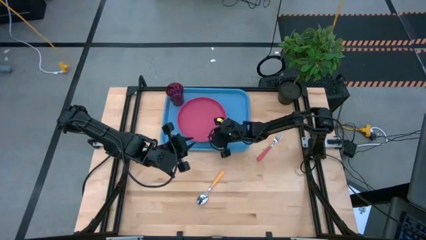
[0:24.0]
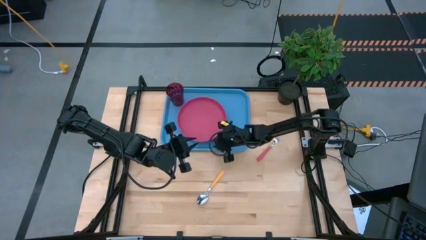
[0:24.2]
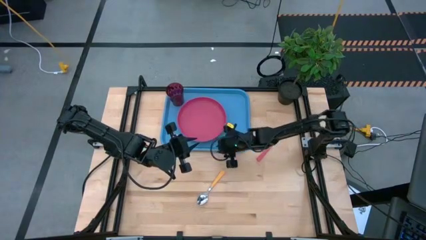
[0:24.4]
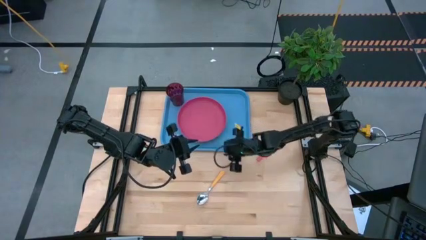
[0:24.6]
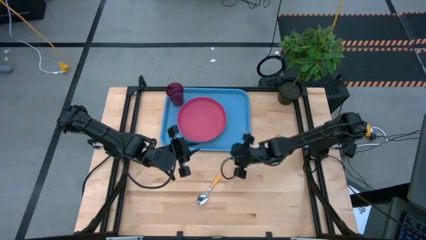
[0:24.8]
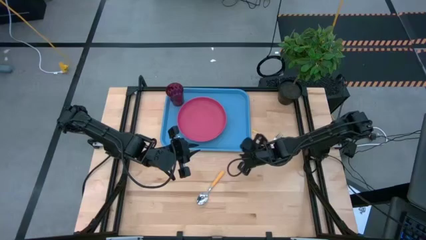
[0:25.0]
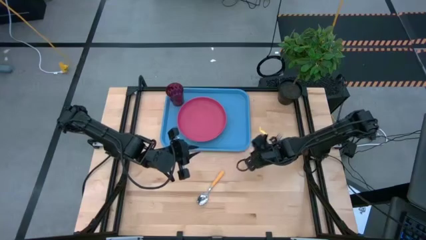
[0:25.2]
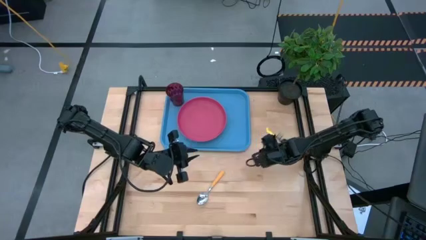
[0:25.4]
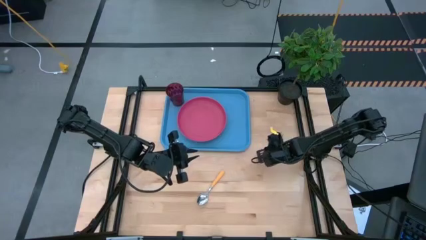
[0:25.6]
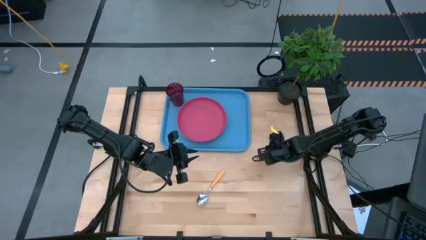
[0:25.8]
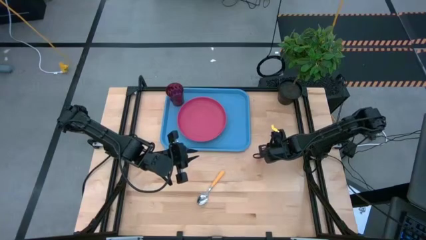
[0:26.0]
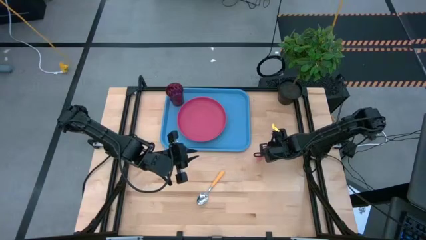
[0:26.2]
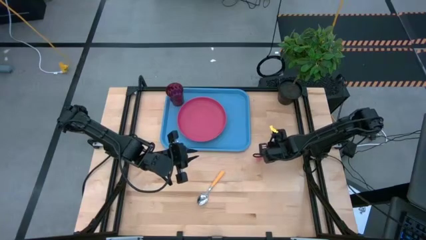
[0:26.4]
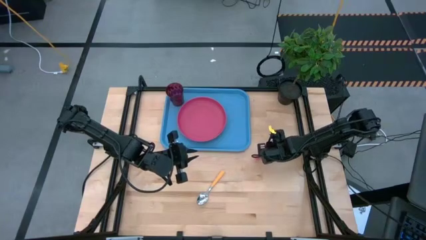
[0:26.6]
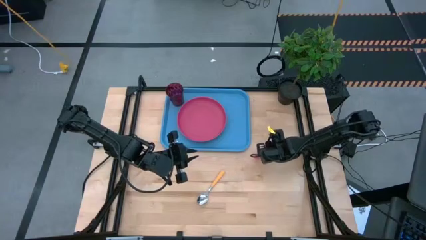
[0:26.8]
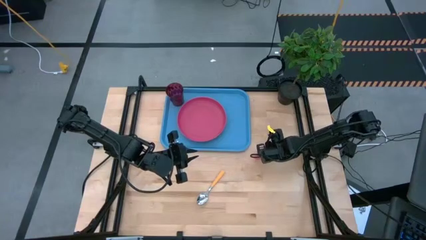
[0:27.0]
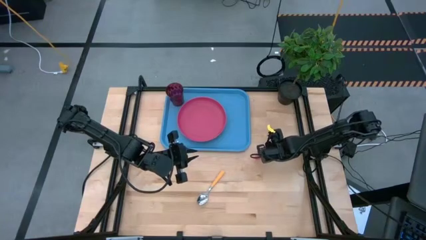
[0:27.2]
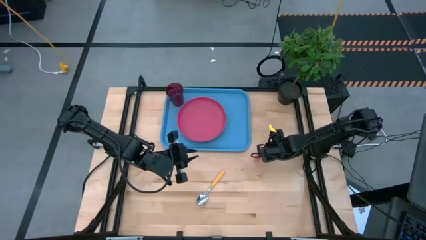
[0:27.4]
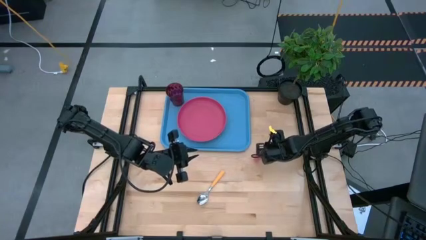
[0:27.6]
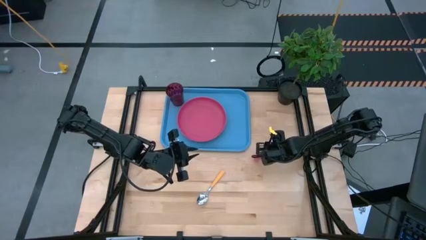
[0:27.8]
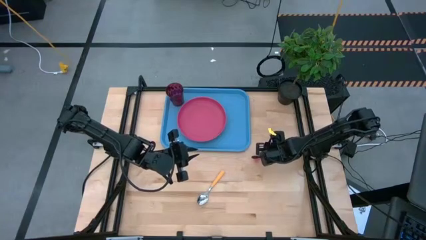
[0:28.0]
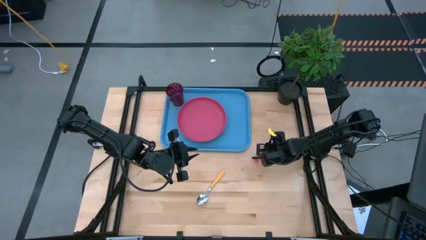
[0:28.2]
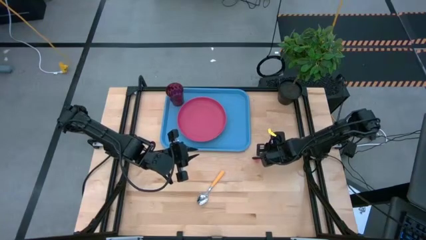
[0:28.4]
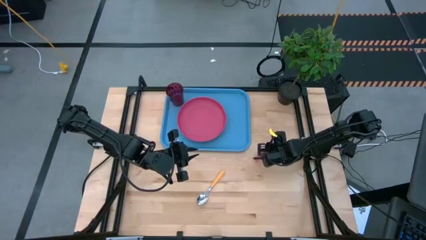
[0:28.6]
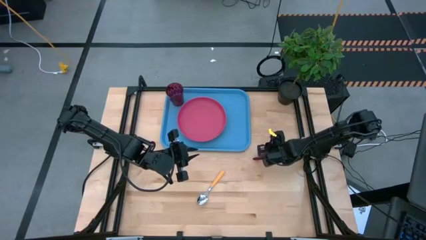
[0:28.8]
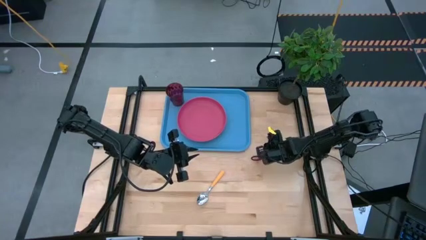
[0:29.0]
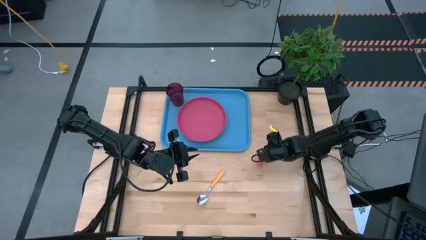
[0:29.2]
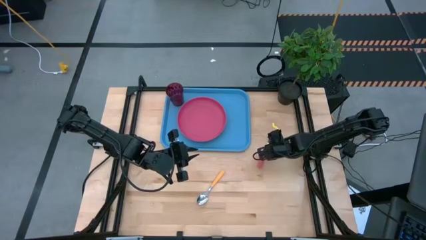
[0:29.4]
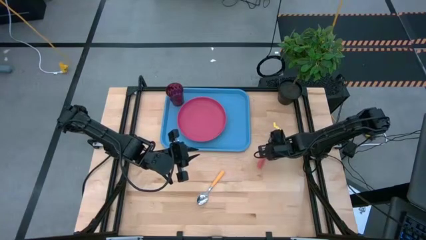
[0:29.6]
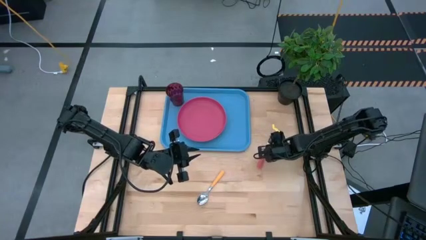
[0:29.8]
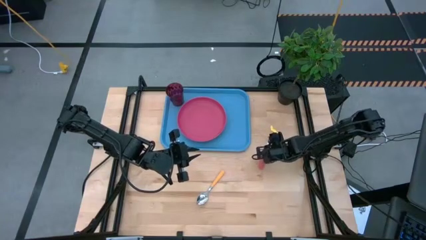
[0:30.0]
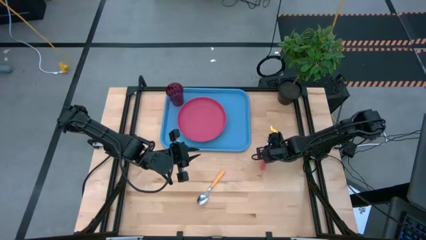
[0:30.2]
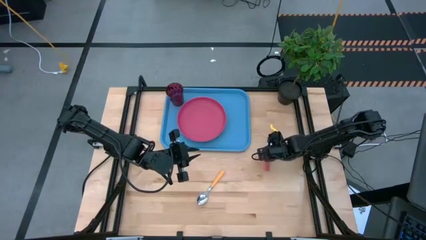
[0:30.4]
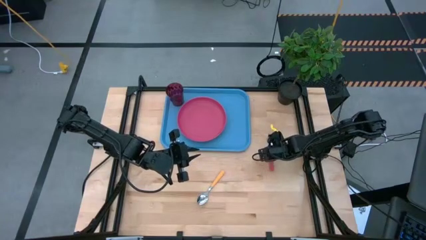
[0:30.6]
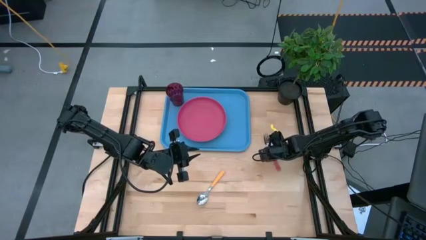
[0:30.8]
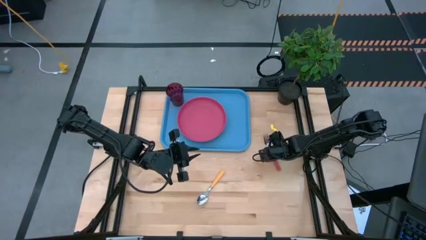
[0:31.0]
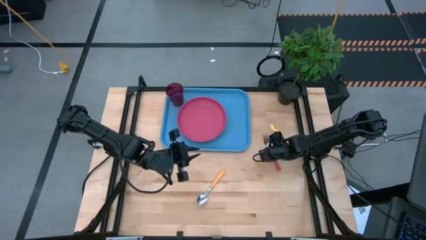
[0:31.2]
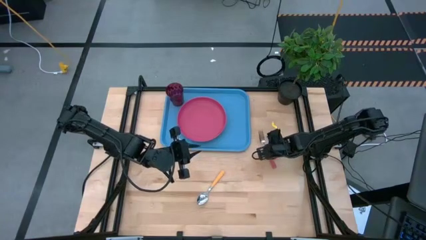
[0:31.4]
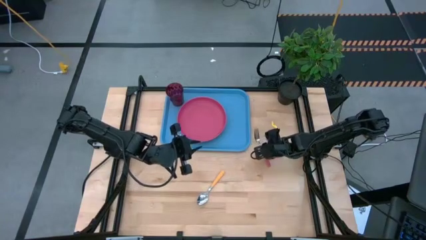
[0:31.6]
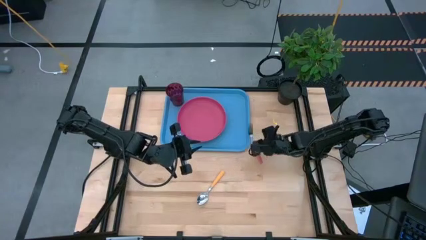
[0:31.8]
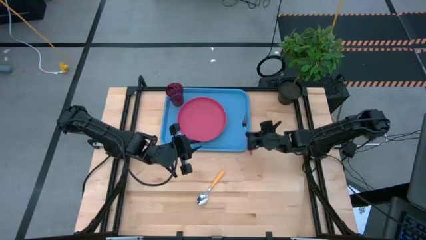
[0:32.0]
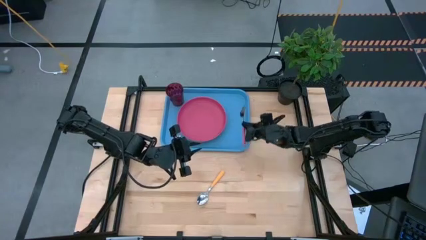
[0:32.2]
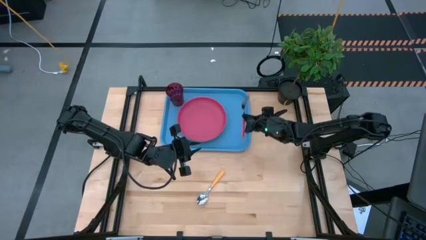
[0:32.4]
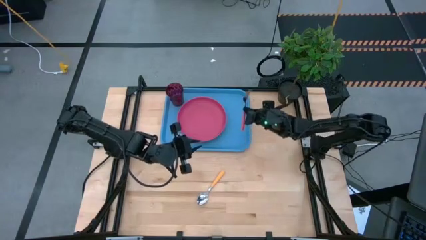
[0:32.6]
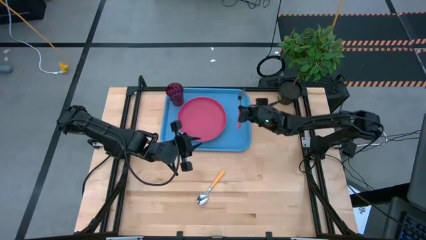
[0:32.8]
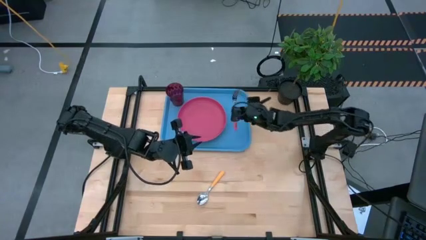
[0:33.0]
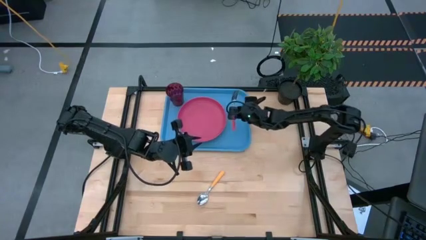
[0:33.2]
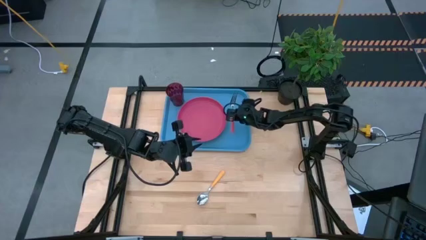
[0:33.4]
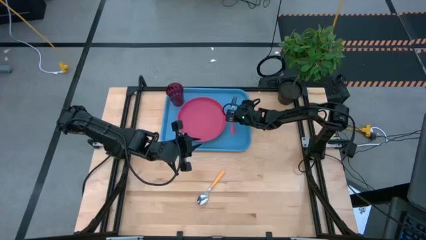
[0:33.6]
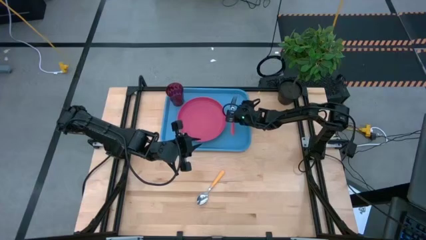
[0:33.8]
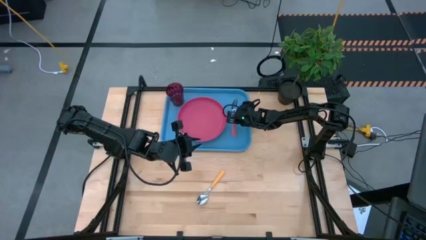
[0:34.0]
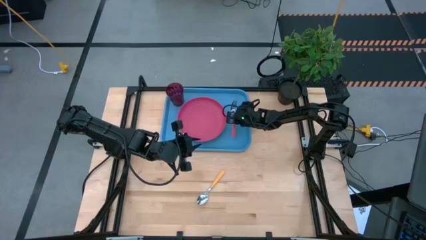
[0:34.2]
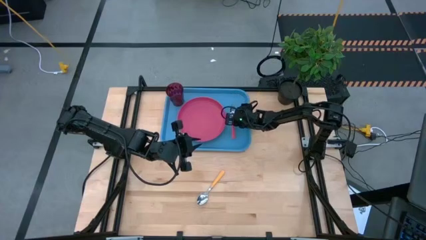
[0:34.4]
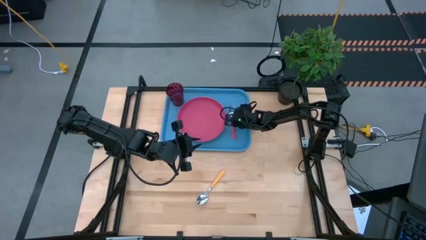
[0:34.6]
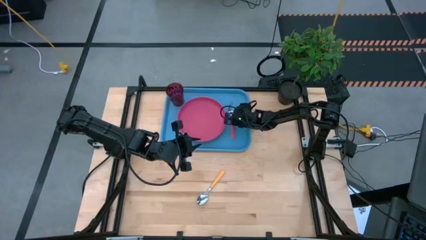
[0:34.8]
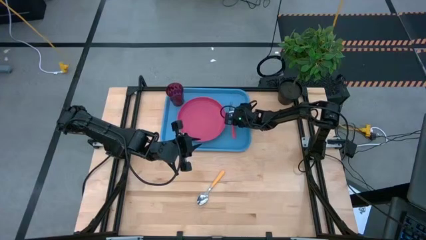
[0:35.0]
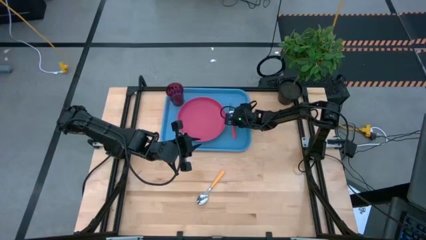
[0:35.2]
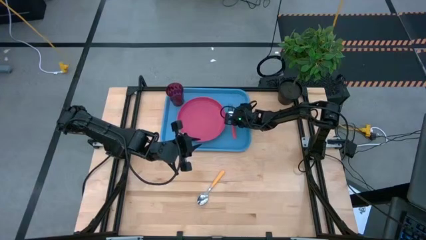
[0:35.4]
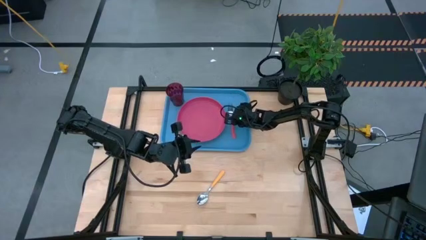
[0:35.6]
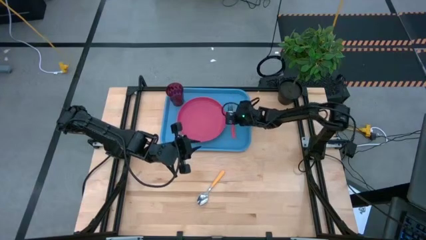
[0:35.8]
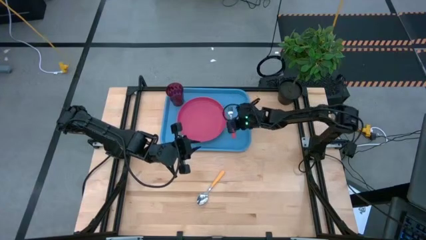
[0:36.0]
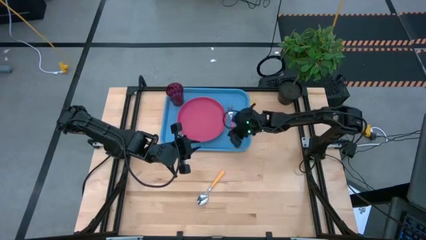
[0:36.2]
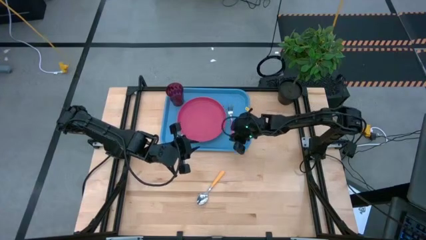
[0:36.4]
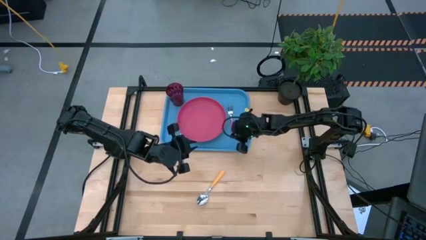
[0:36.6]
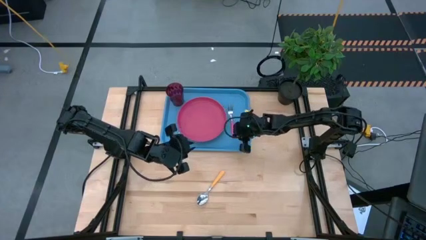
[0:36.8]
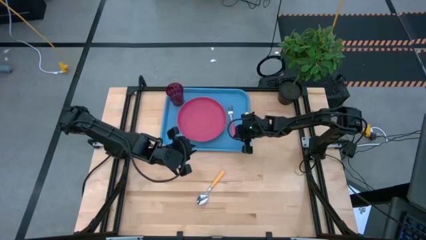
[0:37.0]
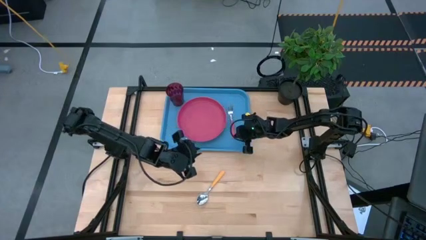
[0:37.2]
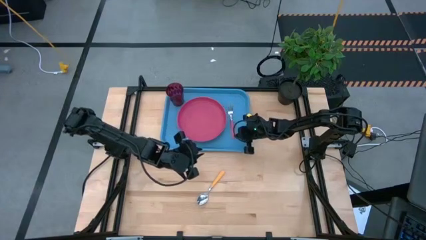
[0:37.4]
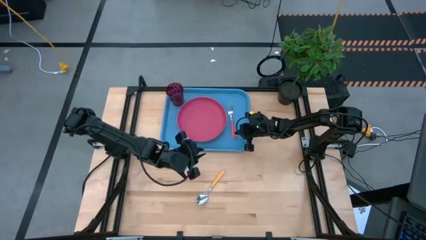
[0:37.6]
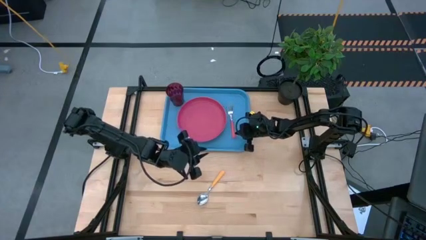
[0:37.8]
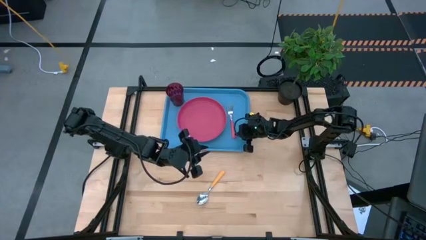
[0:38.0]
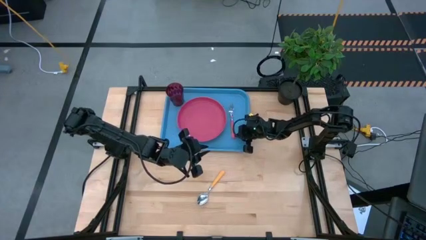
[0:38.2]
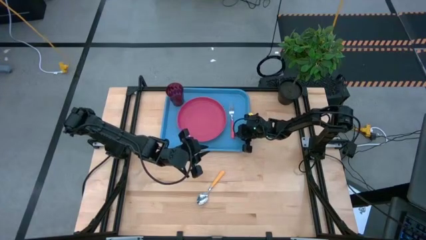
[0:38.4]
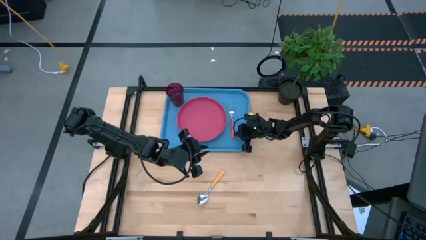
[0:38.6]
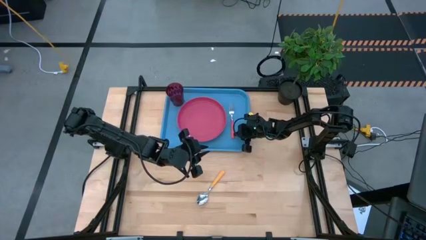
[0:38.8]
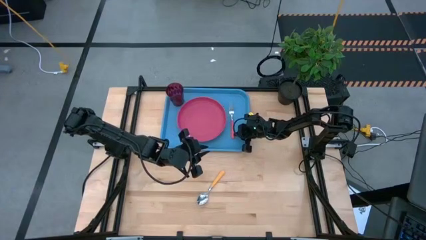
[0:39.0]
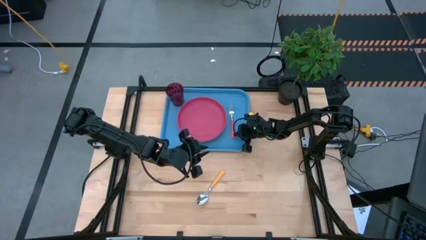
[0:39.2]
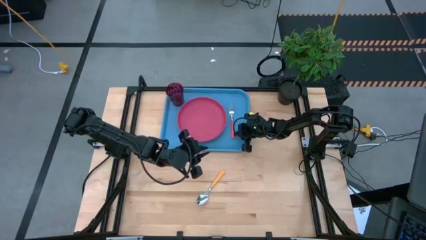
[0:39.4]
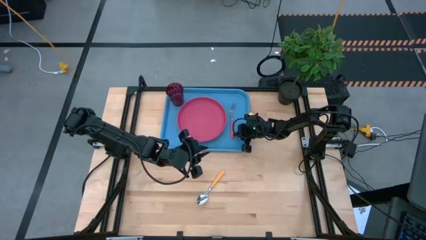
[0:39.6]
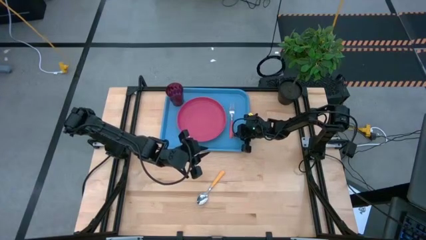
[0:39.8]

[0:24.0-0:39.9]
Task: Pick and place plate/cup/fork/spoon on tray
Put the pink fork on the blue tray to the right of the pink plate
